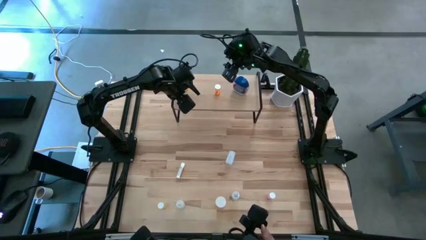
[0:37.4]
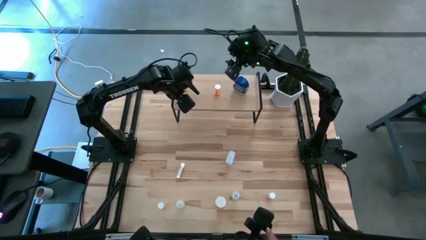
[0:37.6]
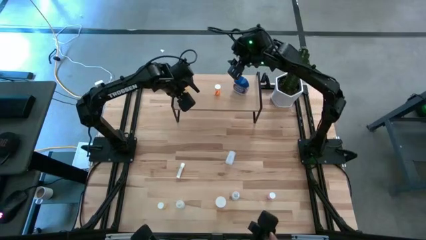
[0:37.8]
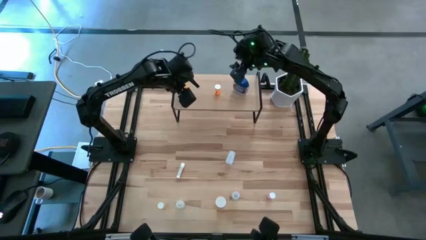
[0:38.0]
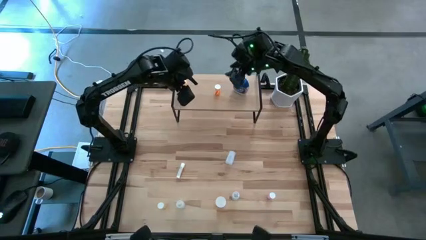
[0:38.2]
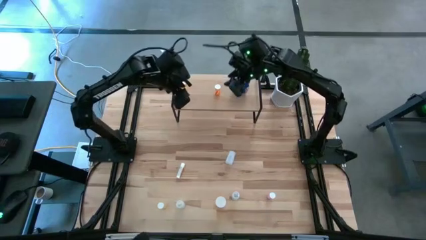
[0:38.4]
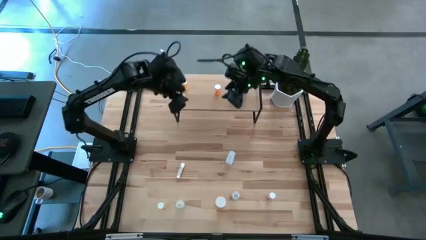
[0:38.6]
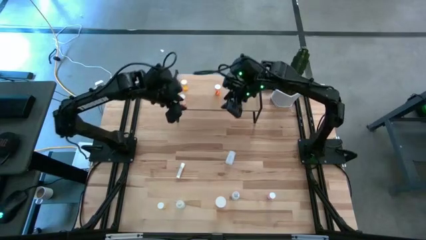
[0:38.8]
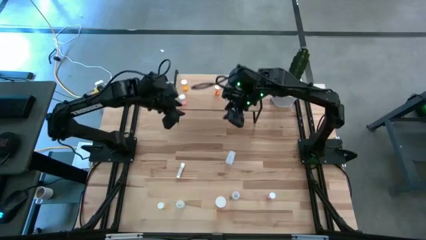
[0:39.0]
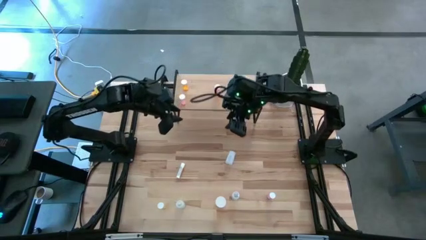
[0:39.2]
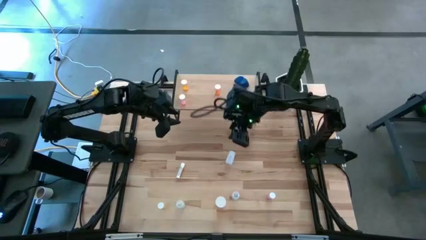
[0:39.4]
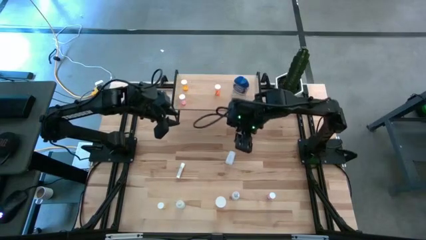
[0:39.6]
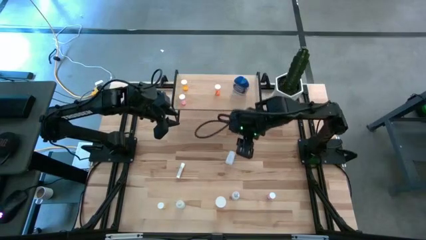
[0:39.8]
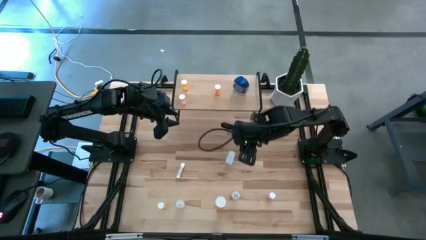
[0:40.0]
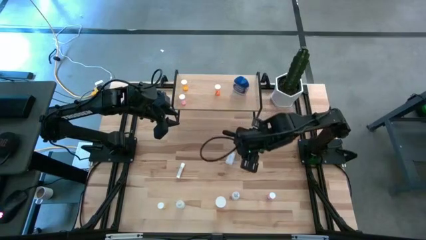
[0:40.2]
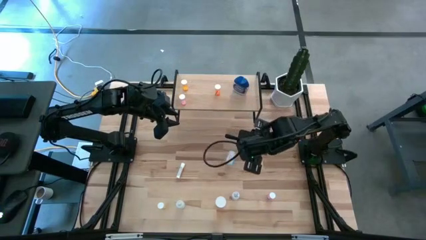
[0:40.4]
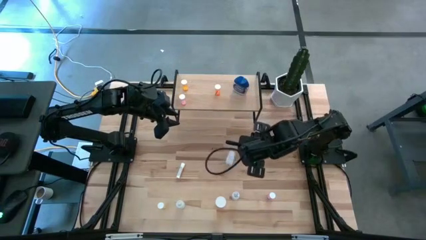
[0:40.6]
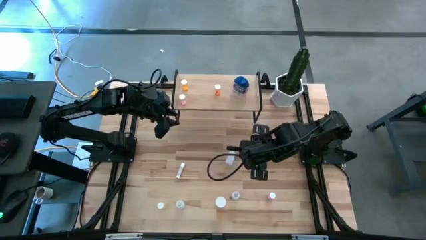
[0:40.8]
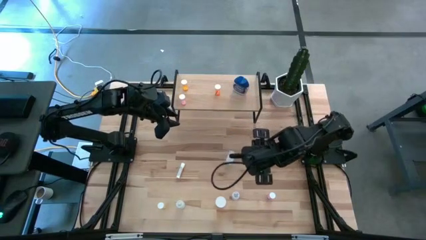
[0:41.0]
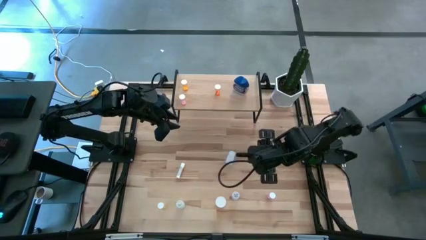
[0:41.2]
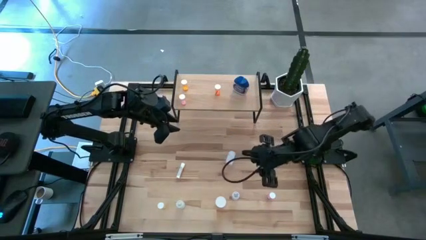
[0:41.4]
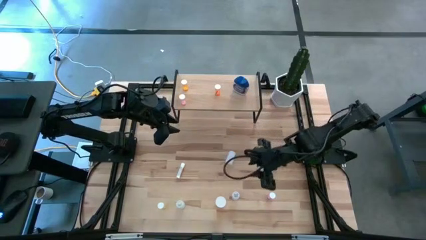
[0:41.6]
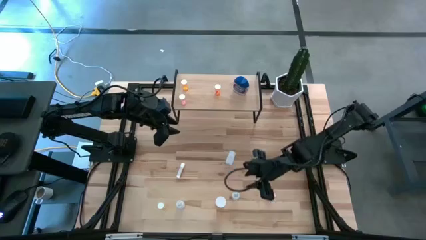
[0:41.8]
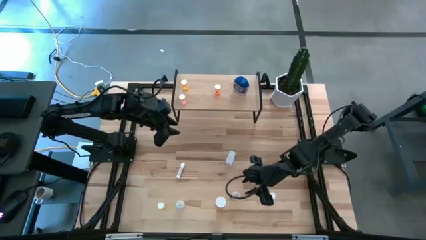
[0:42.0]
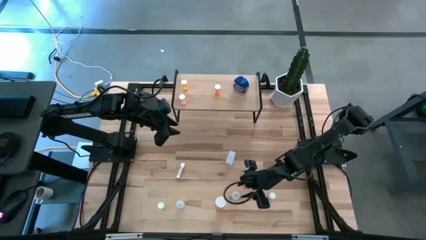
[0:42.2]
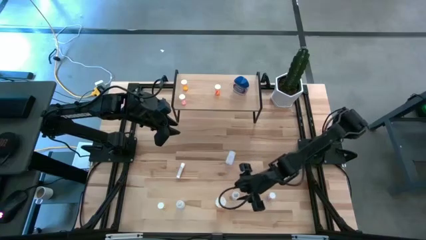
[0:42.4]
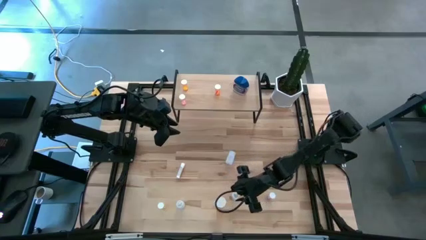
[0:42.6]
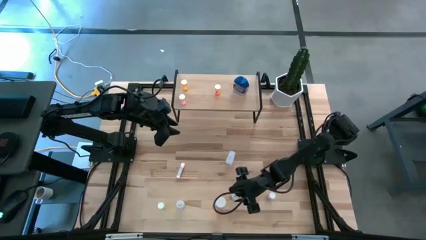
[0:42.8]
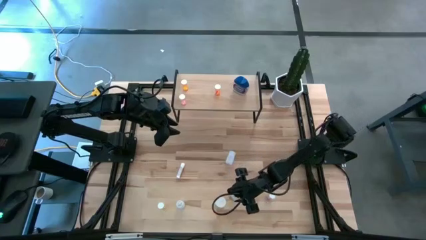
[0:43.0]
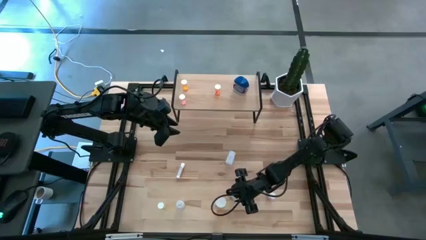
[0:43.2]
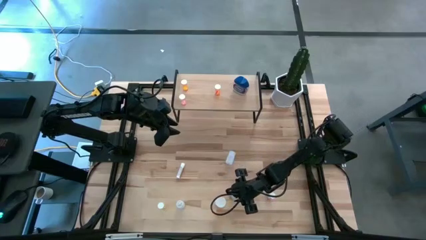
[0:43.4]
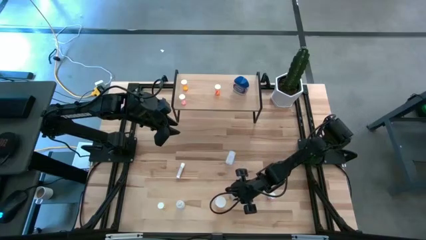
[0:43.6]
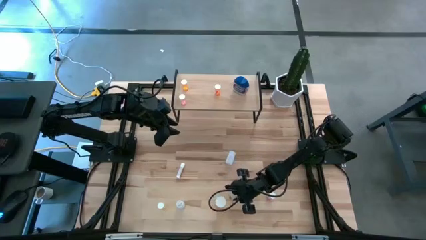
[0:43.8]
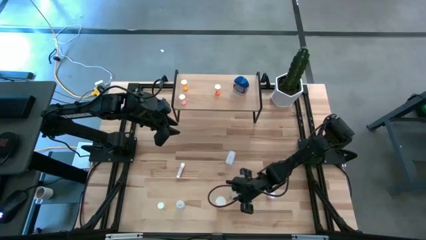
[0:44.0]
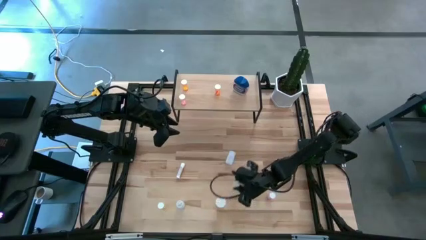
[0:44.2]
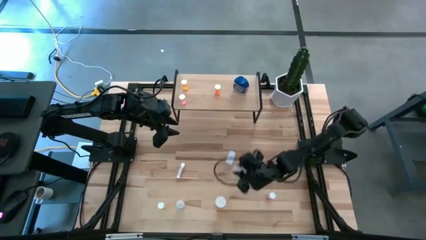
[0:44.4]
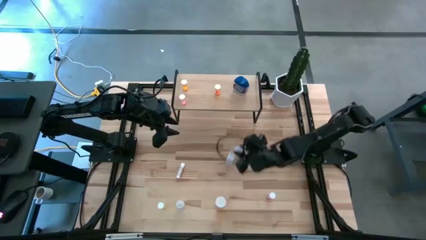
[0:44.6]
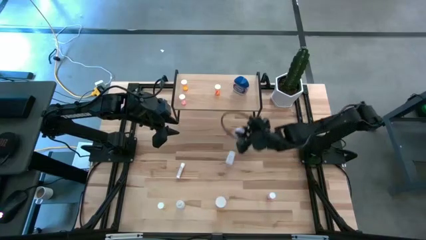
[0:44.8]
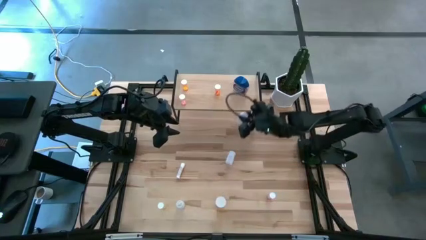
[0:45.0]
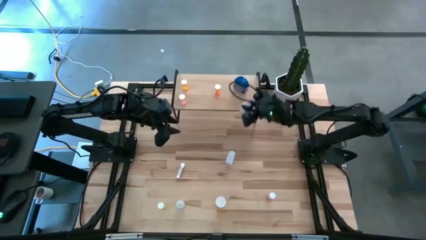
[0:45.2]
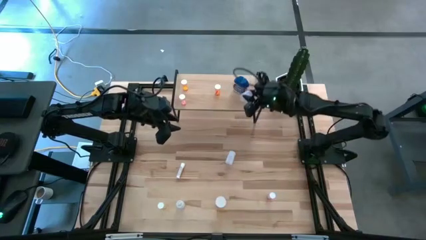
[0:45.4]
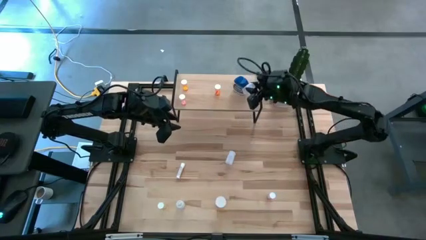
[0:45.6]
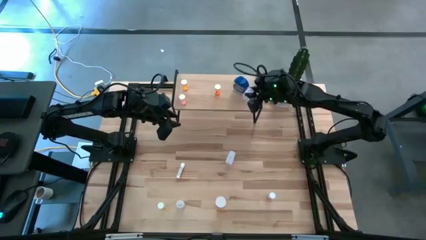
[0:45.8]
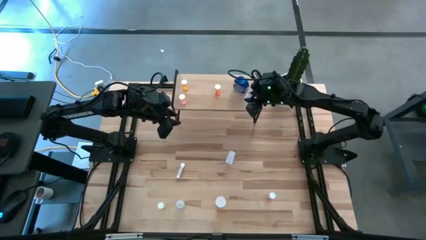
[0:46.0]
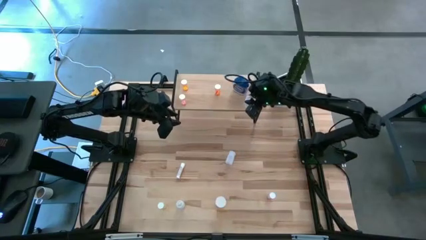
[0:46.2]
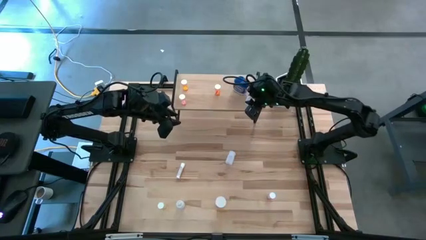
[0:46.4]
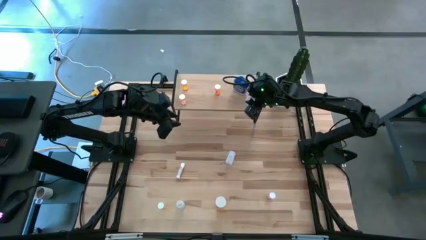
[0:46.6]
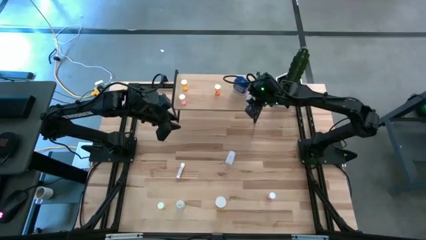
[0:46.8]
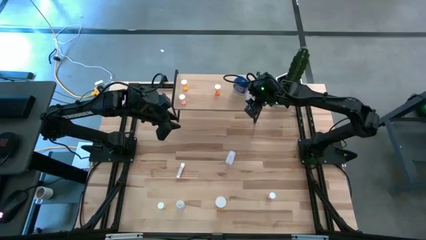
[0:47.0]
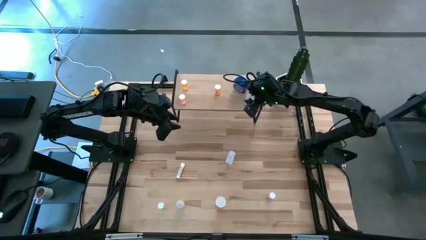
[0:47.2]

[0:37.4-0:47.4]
Task: Pick and place medicine bottles onto shelf by color
Put the bottom right transparent pill bottle on the shelf

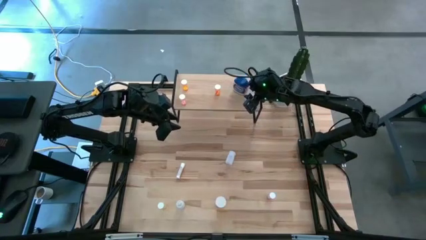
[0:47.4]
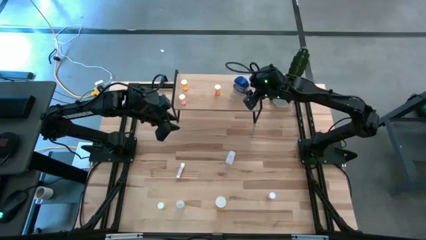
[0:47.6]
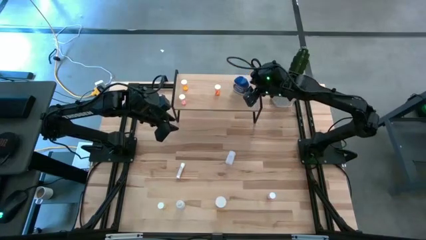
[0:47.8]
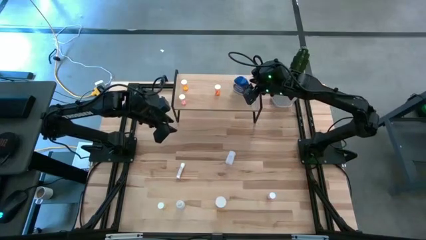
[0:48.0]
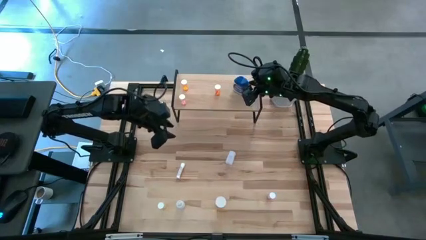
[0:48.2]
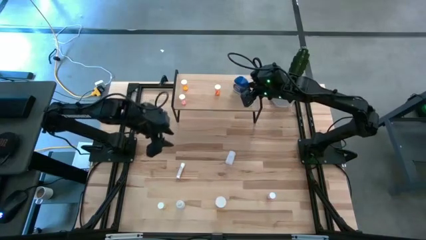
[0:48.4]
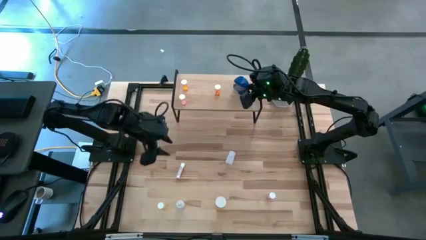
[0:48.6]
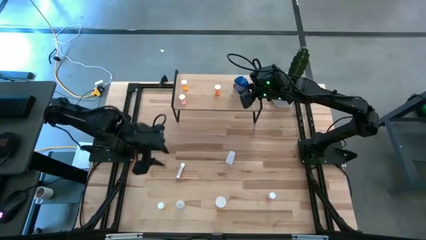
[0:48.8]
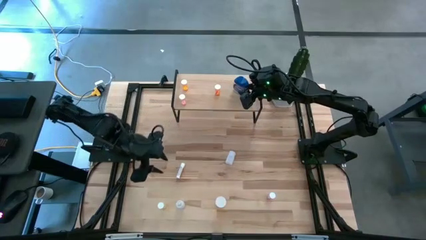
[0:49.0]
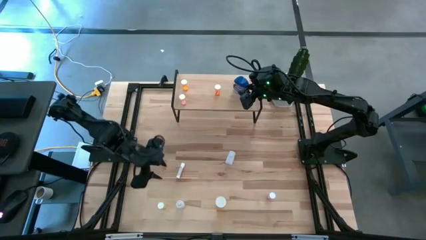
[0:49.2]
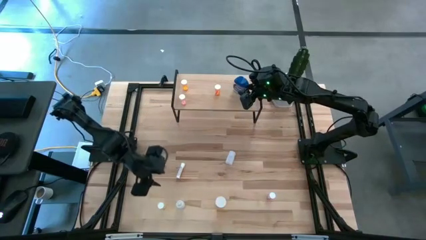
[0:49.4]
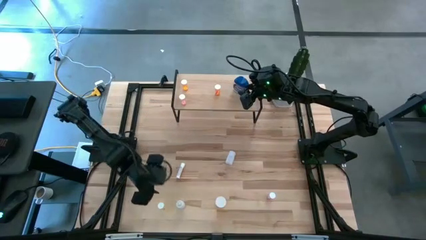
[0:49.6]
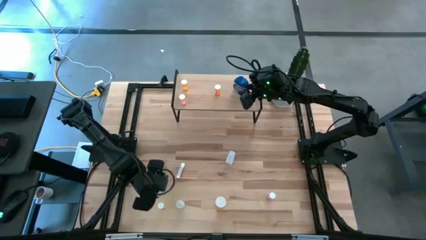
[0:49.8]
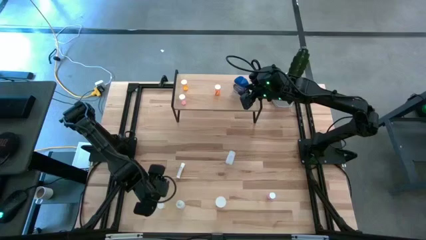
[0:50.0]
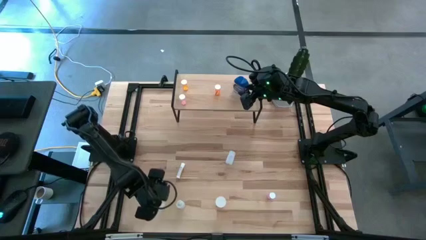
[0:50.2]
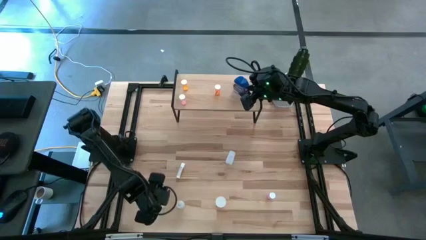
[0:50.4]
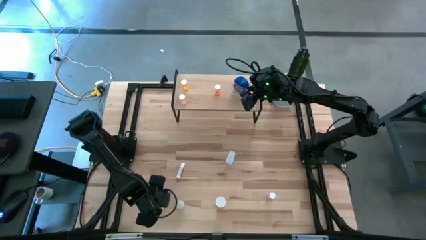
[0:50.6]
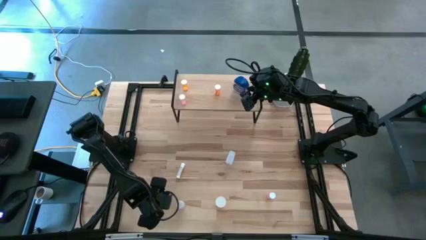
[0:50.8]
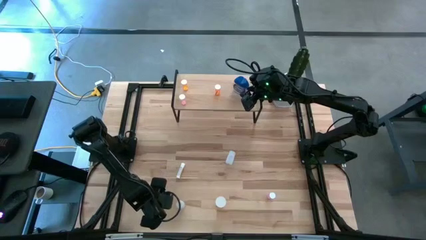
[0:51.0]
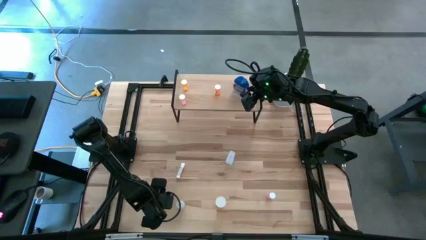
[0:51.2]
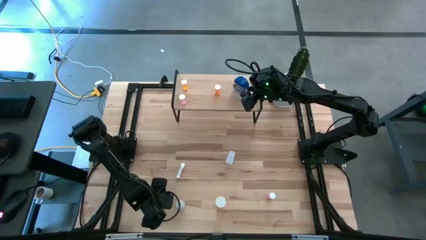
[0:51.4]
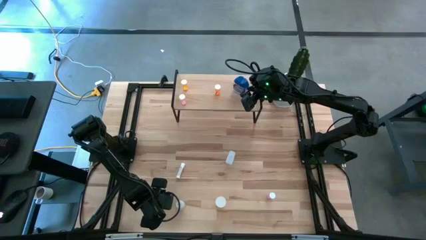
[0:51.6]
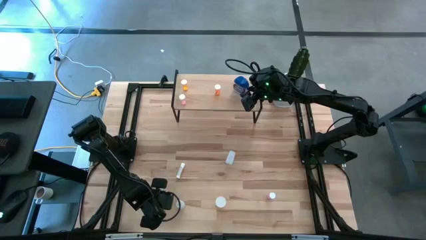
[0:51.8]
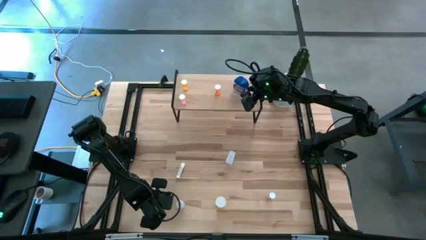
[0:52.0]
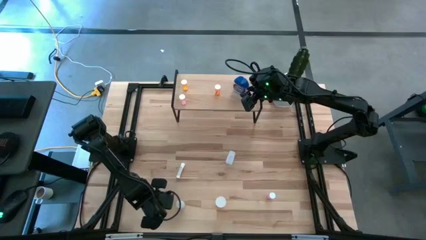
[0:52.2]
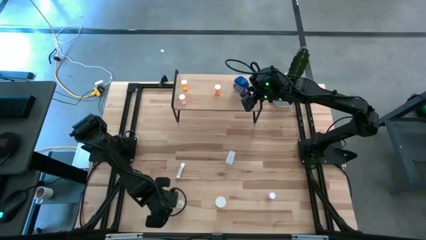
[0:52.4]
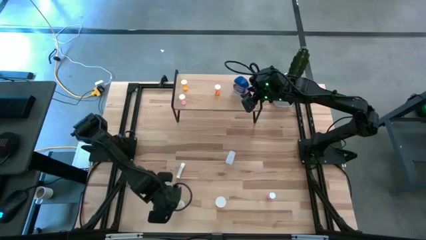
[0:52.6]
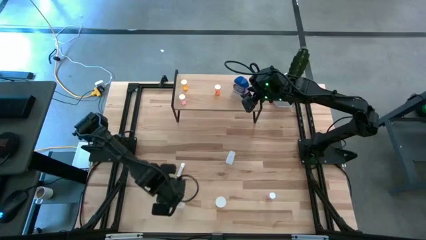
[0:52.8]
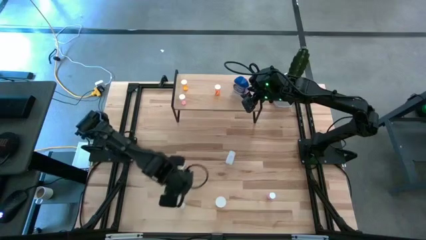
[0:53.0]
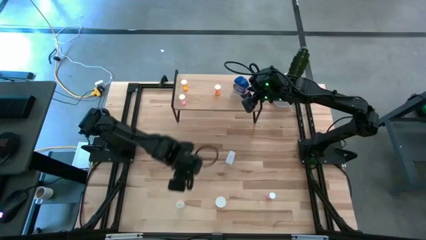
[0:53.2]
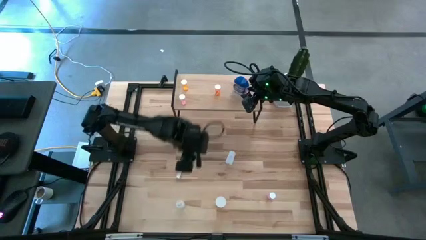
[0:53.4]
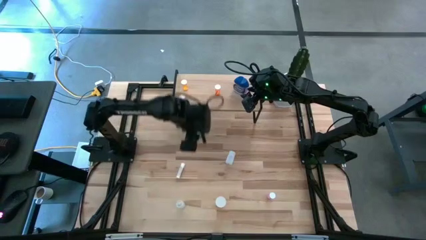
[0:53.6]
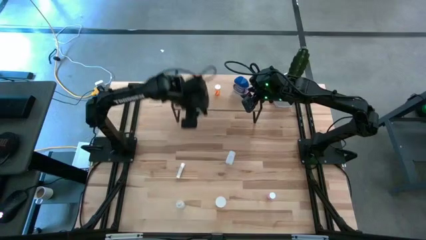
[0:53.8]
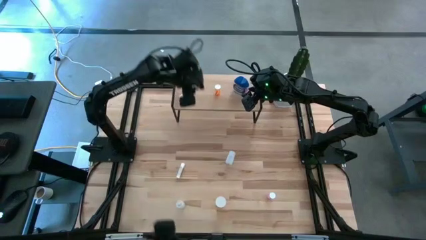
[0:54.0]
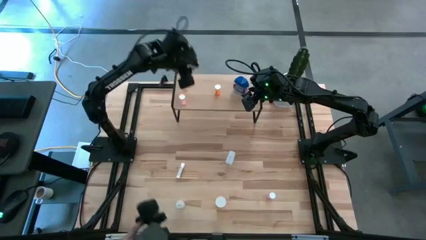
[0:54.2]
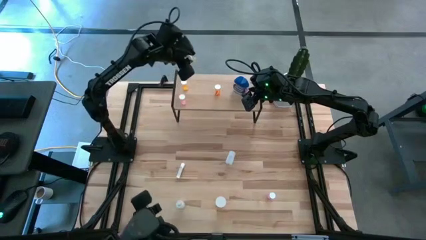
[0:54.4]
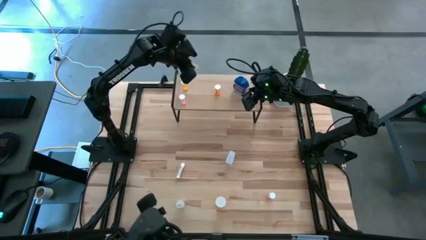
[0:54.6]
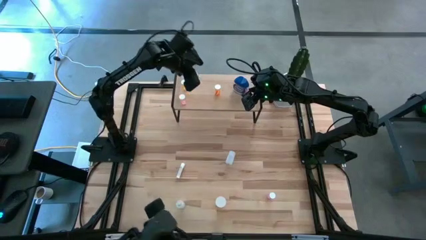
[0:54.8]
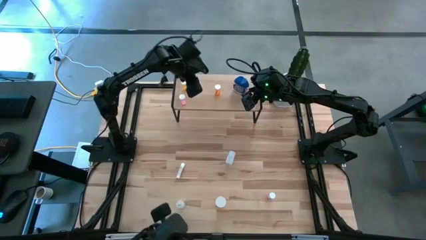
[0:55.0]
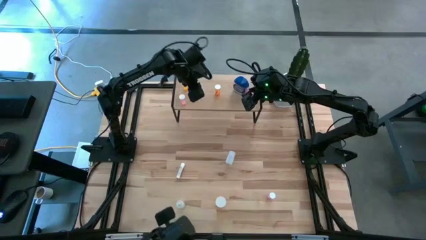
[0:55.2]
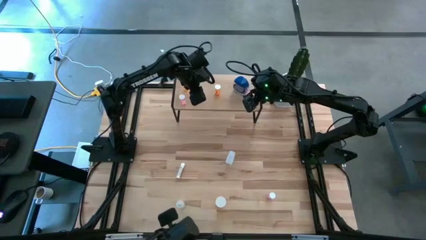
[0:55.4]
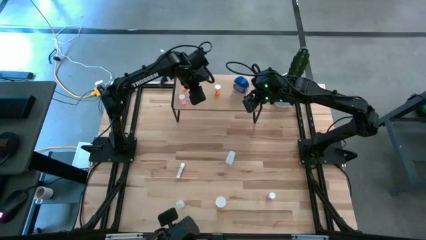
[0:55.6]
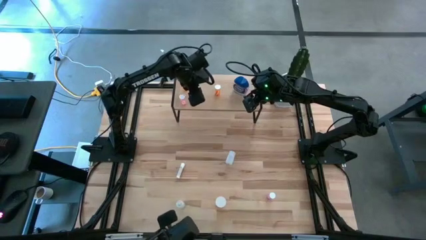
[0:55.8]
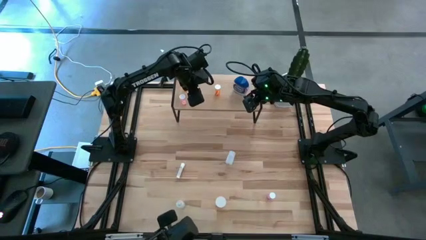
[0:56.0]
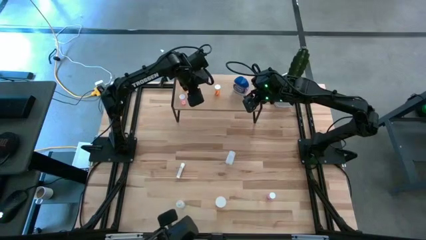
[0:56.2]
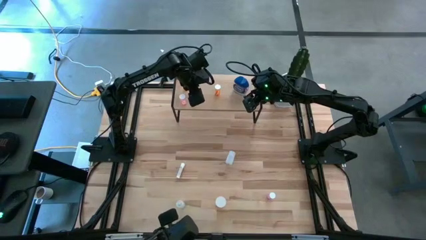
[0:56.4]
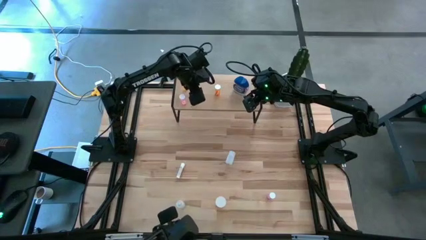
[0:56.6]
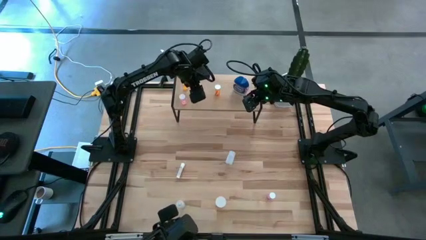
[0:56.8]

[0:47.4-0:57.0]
Put the yellow pill bottle on the shelf
